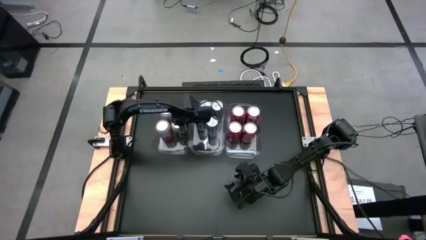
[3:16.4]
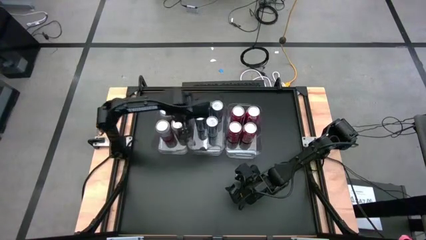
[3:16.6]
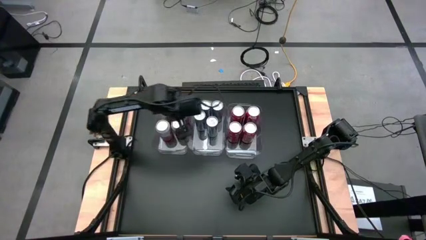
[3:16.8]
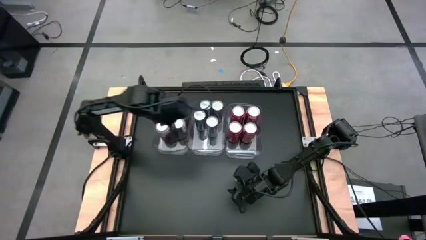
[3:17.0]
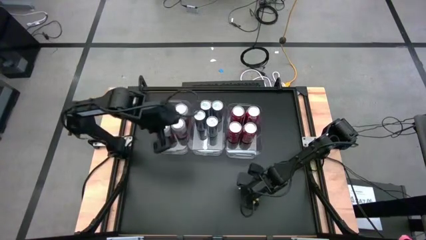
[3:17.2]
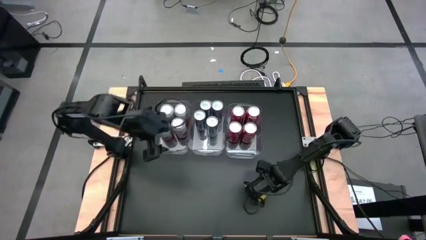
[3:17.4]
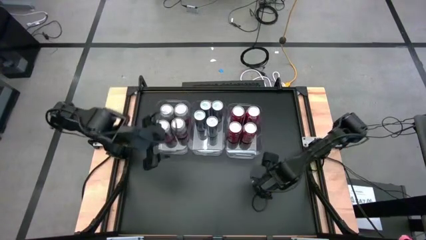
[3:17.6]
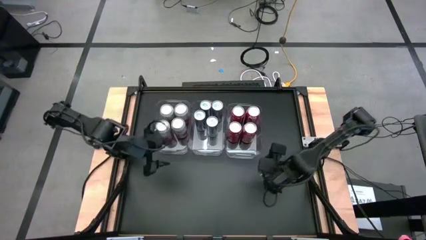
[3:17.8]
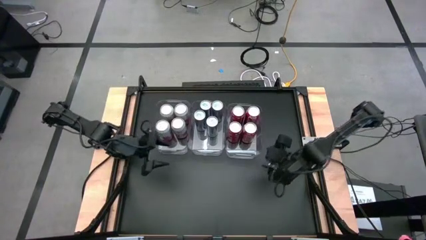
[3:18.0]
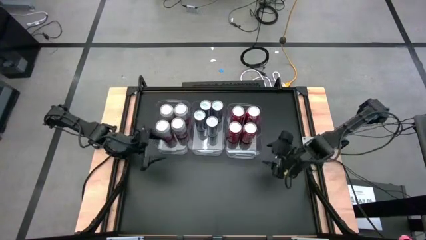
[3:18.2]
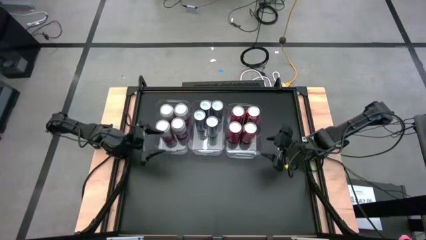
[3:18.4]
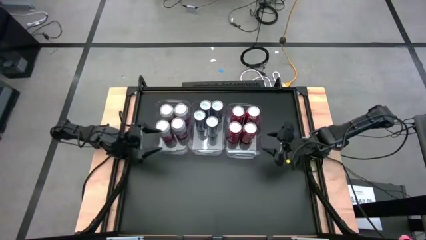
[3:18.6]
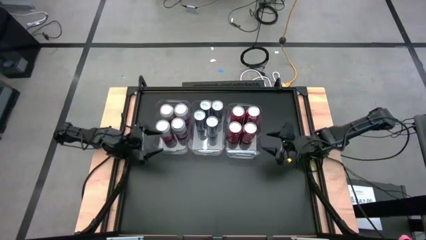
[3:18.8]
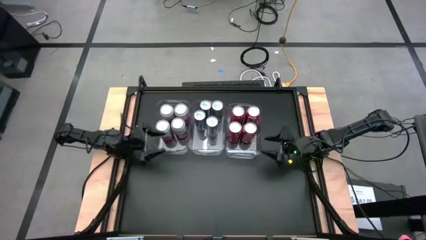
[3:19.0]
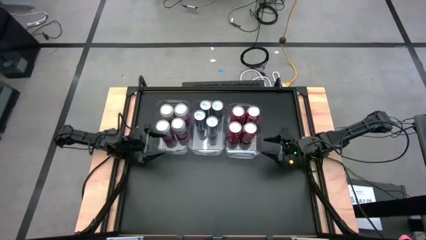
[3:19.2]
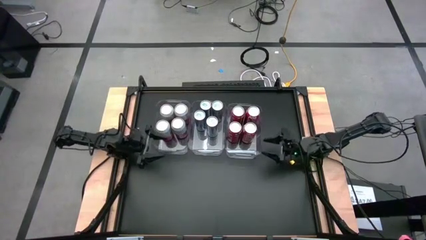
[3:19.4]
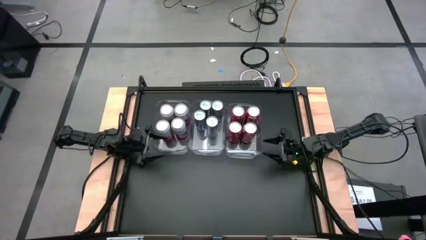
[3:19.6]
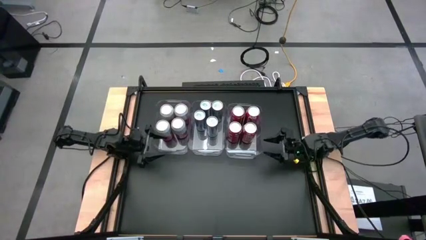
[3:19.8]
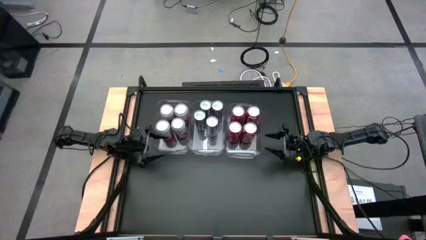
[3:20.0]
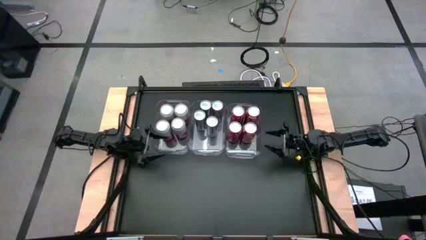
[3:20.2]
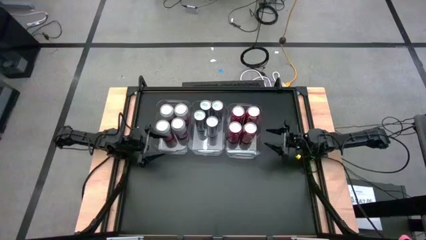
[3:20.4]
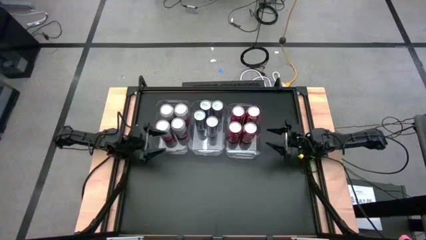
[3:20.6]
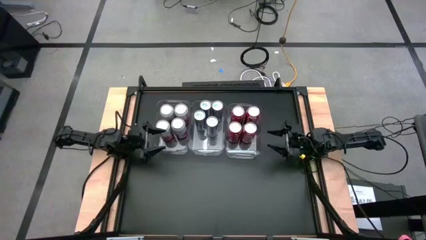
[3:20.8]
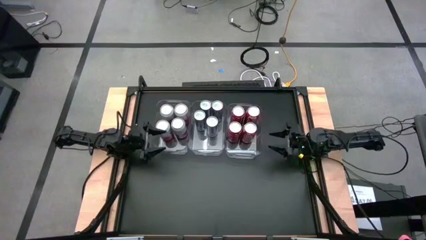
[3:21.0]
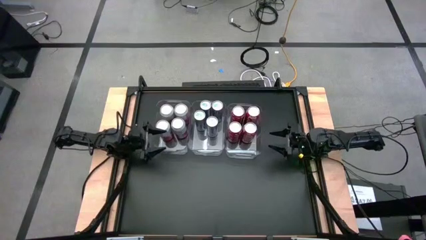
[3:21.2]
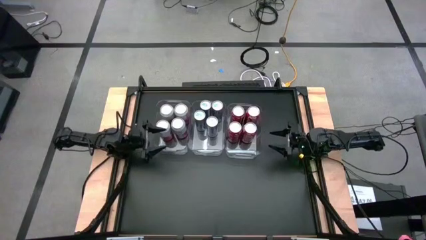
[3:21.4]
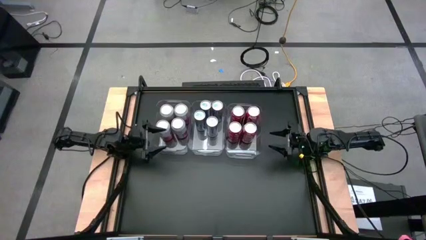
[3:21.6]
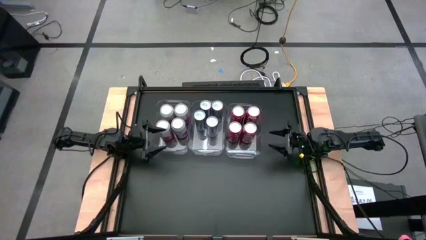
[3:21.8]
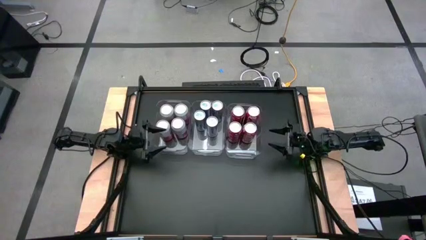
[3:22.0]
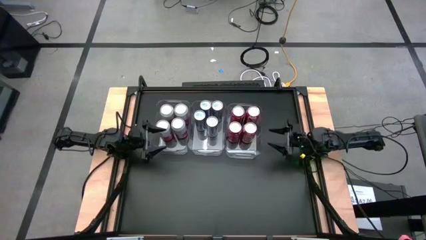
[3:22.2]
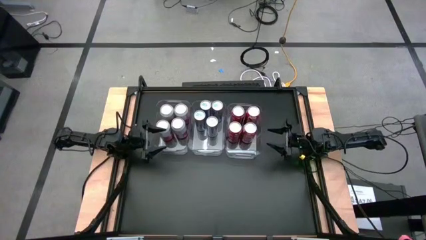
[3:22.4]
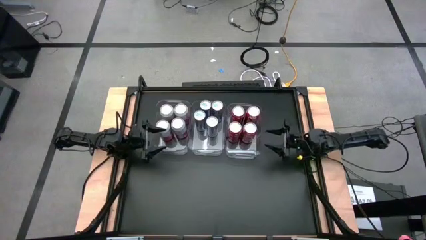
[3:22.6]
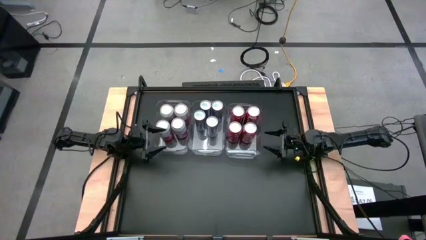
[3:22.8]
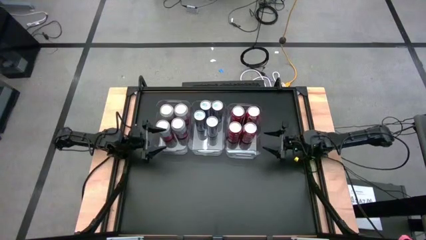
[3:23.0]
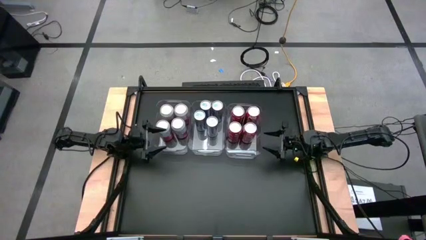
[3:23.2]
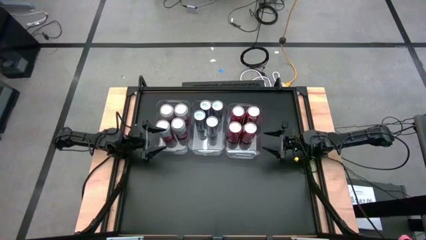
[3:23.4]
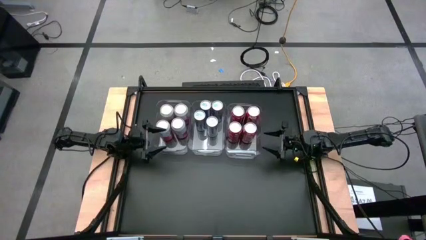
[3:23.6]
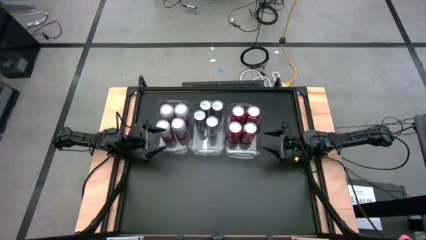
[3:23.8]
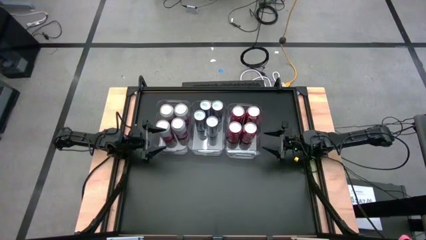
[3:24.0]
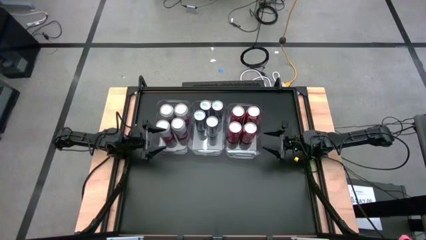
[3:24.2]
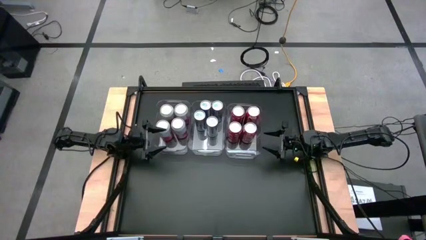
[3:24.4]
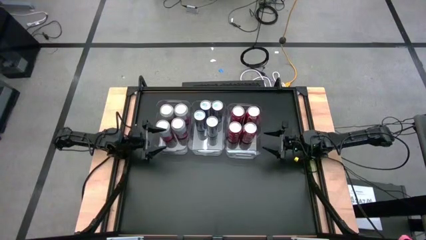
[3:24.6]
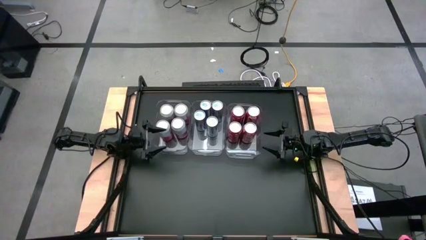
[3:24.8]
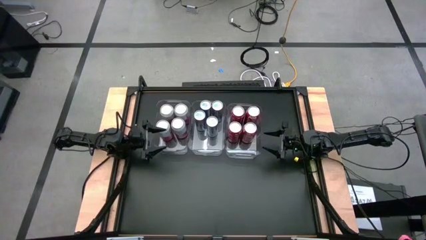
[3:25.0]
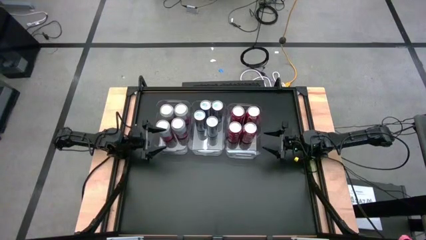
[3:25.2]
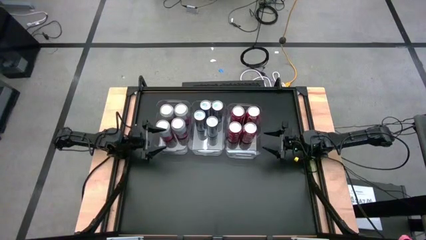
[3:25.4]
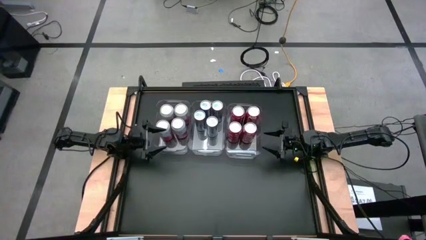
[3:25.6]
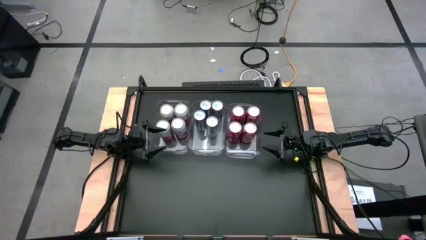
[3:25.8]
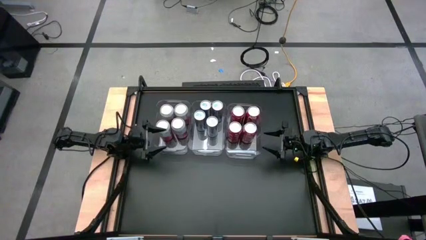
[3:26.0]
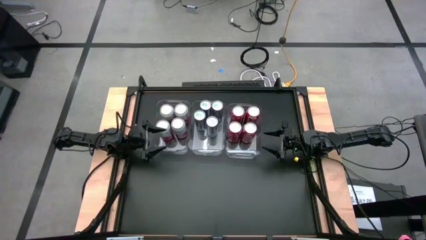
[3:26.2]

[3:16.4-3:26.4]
Task: Sort soda cans
Return to Home Position
